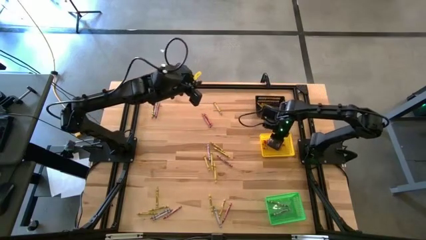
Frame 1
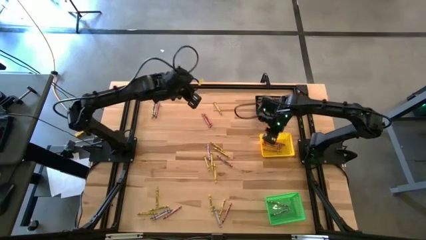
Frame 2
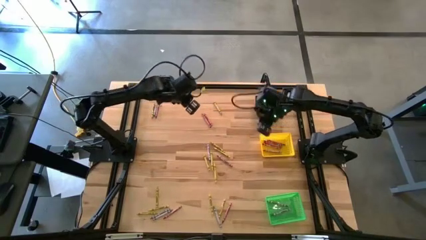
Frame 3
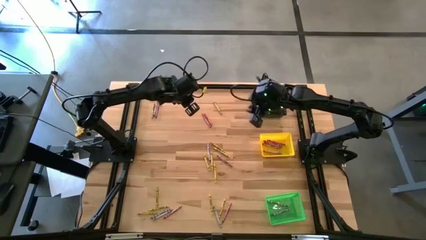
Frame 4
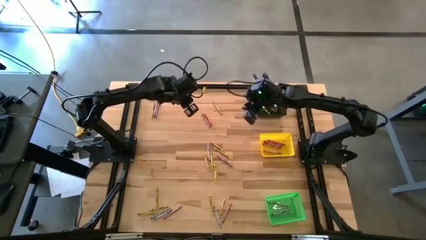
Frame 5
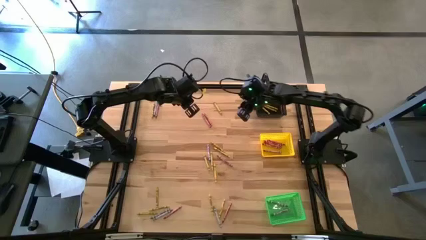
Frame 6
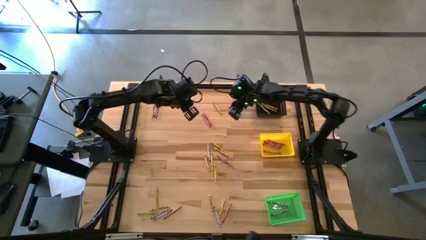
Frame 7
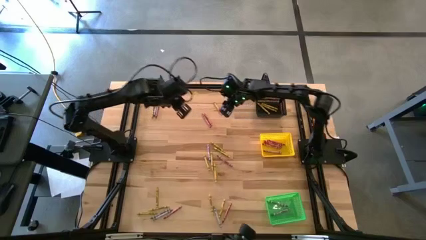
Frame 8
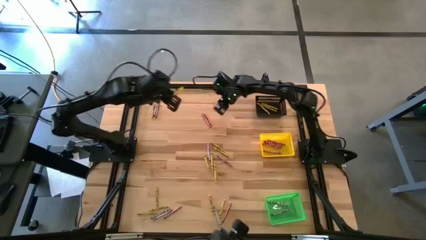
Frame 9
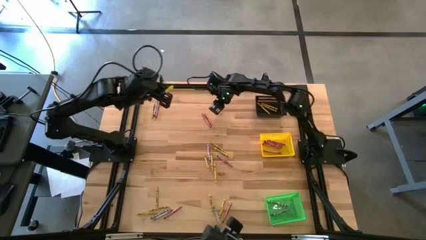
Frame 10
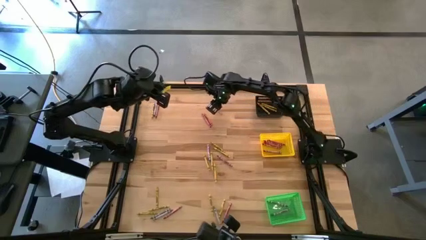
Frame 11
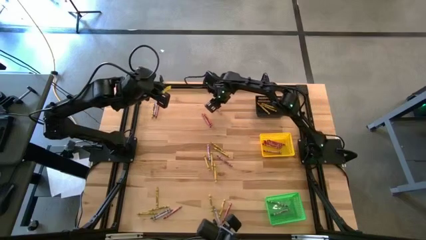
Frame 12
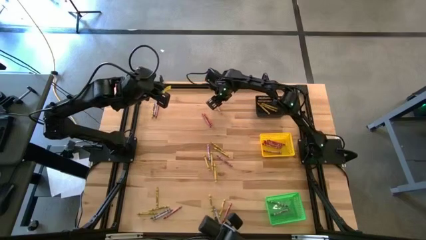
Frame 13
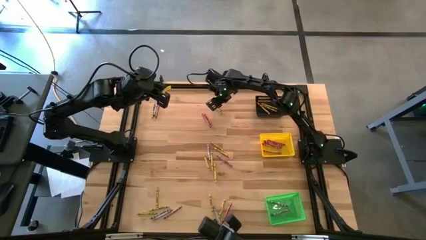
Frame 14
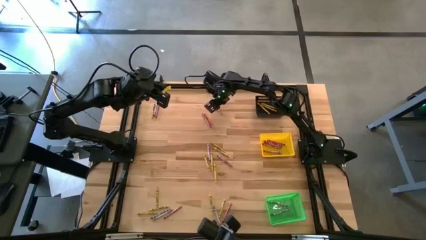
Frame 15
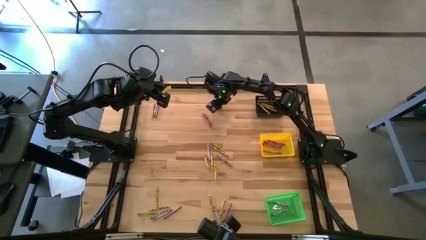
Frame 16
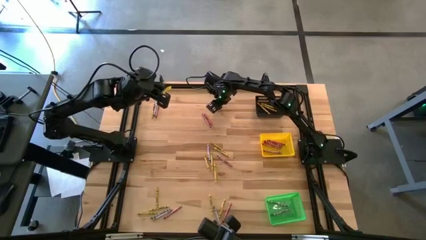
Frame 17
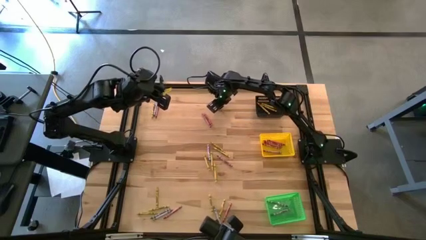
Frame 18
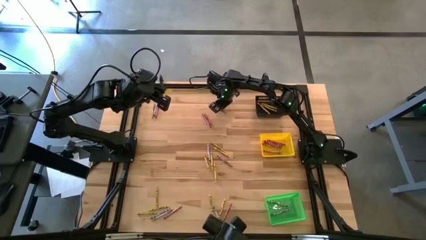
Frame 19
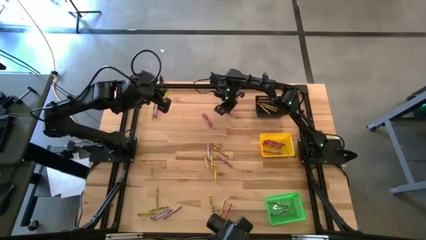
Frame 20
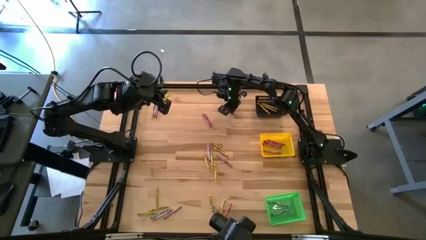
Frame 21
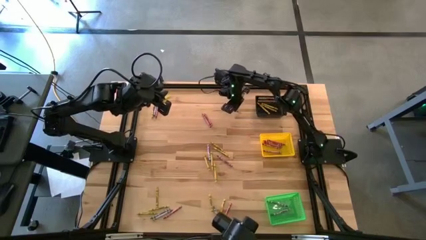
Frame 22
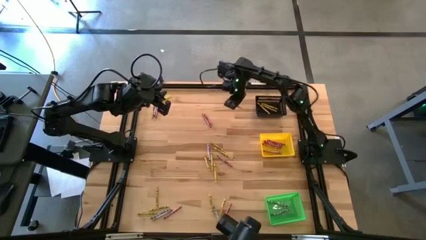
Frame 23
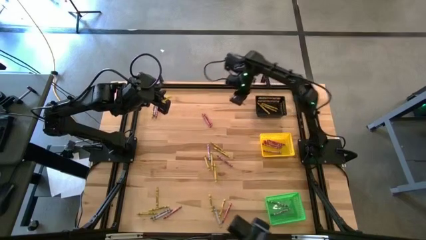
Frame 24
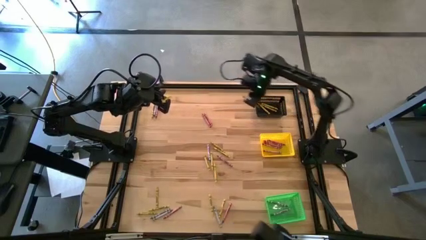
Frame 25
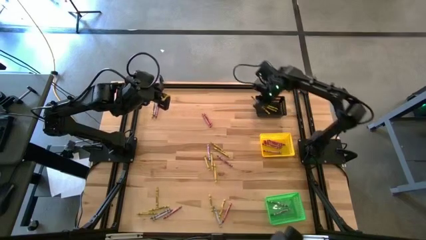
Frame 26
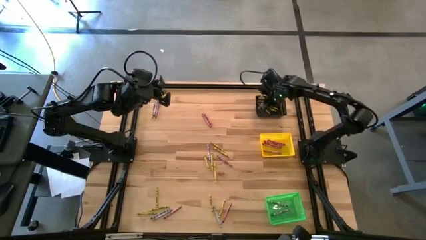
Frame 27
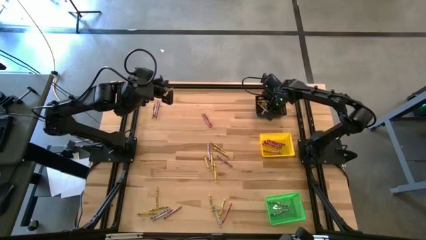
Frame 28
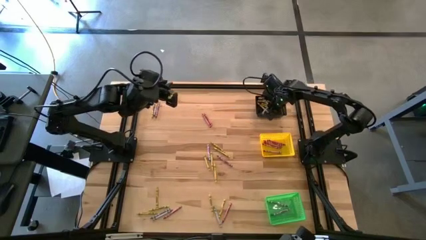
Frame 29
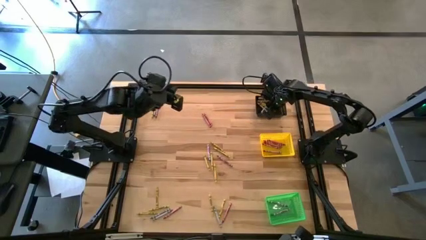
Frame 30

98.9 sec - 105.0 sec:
Task: Sort crayons
Put the yellow crayon into the black bin

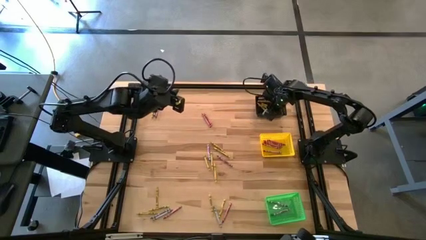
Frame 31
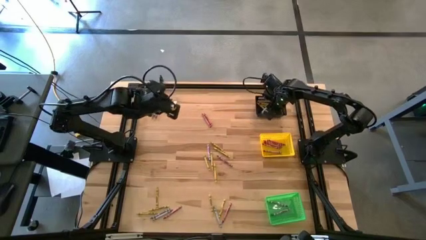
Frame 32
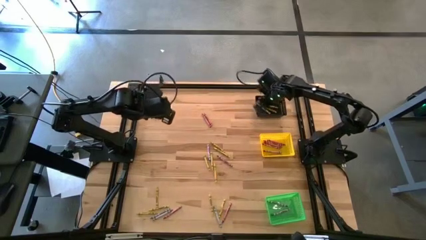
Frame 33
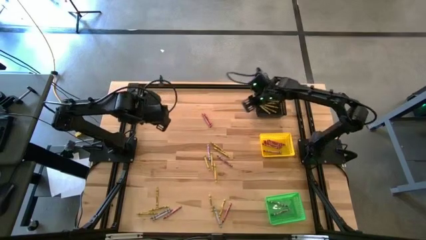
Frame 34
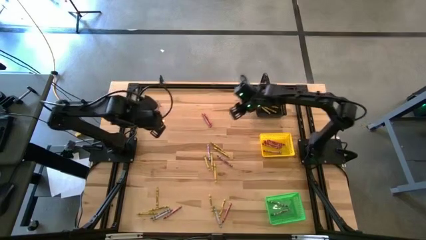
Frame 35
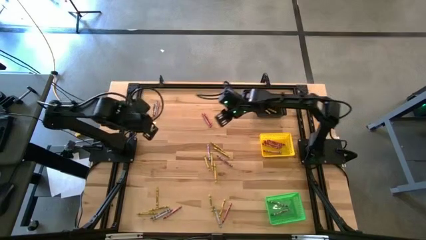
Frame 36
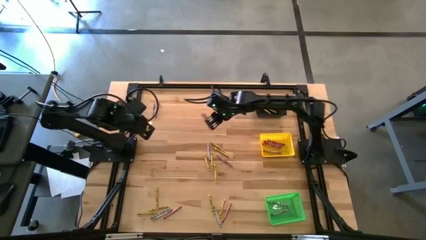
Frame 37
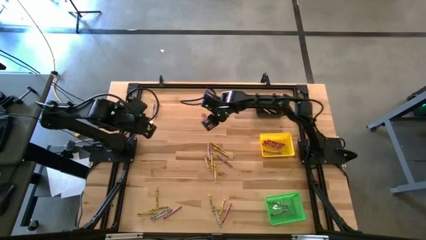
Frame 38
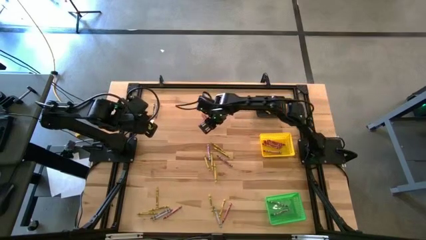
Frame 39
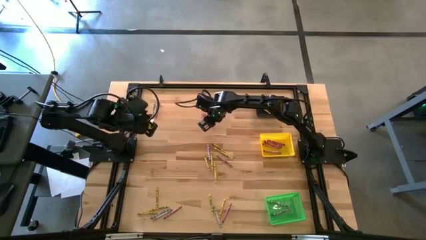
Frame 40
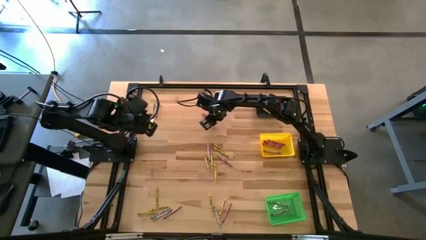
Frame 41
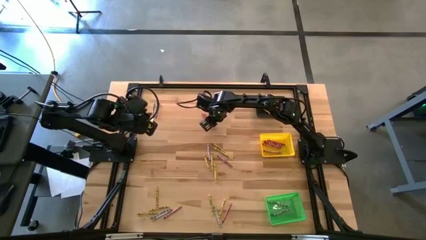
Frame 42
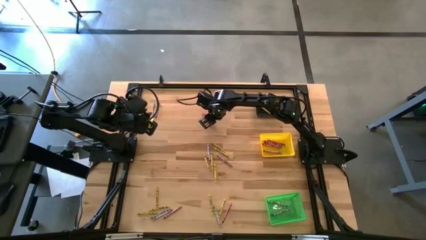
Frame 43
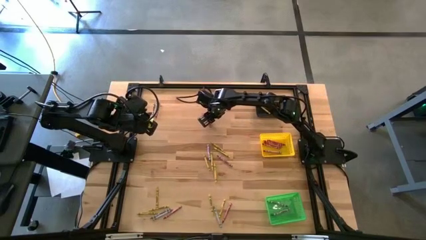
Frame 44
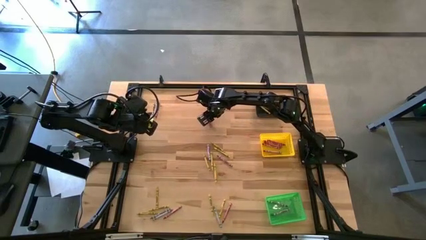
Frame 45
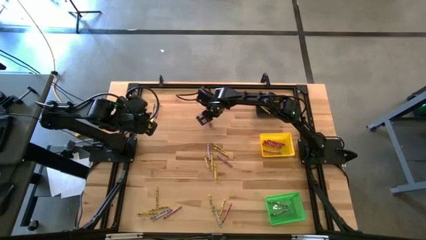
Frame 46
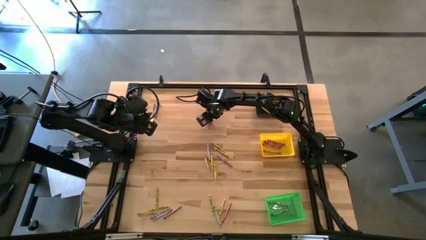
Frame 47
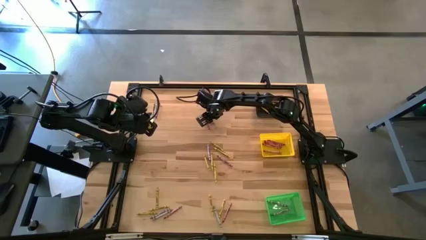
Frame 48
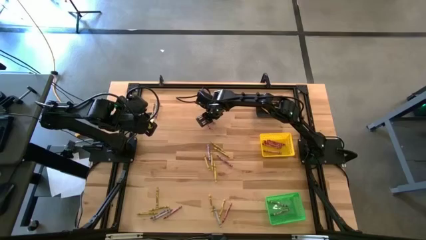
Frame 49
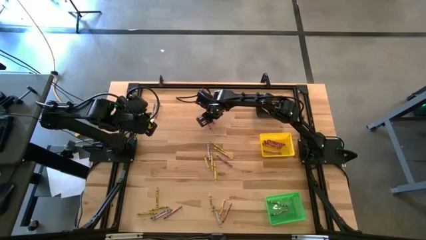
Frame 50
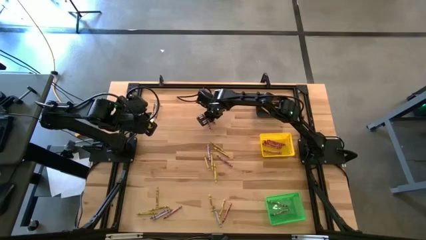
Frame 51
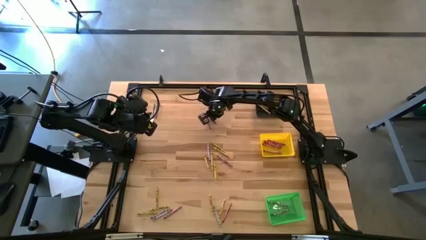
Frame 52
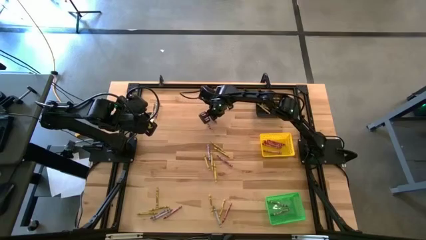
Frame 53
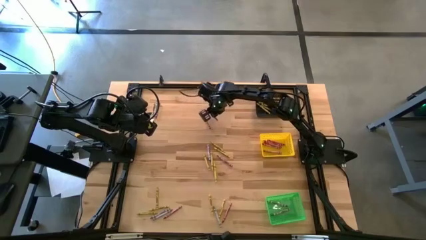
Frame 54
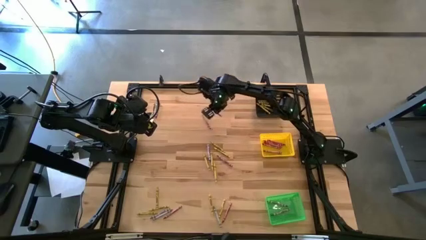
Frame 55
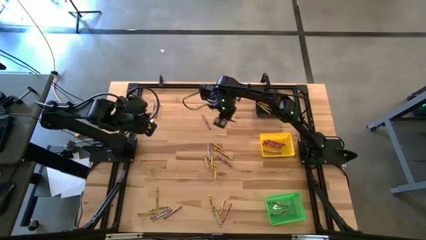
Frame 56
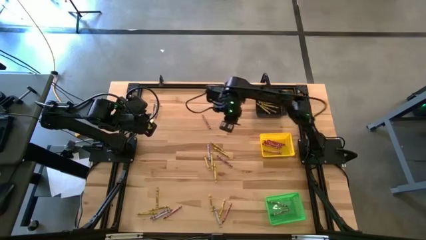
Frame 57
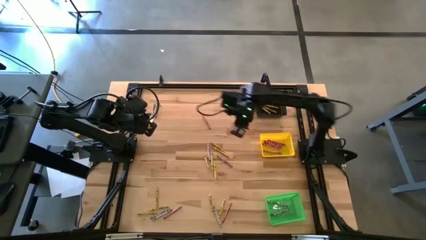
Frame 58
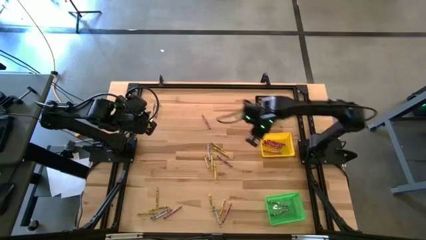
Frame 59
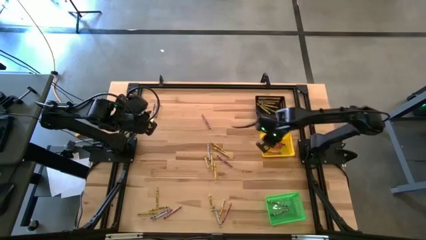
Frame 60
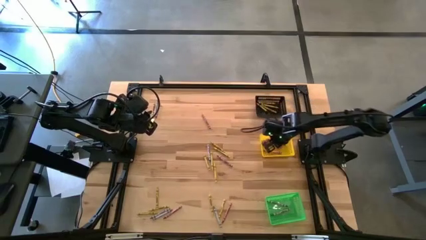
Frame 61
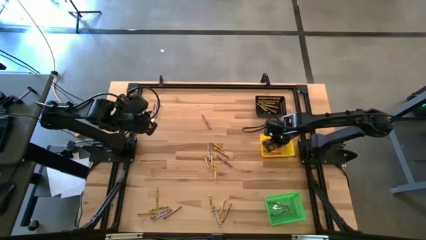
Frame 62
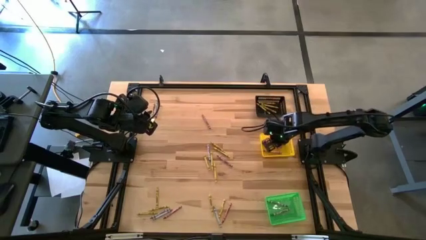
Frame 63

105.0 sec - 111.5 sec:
Put the red crayon into the yellow bin

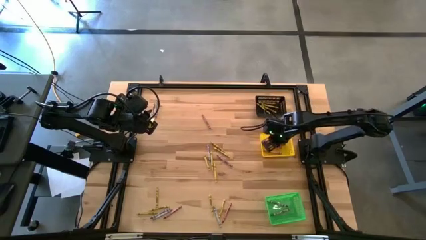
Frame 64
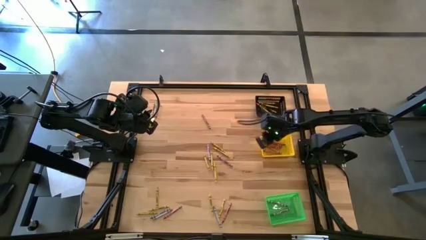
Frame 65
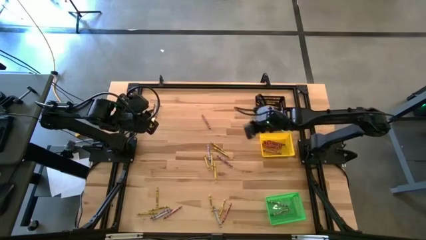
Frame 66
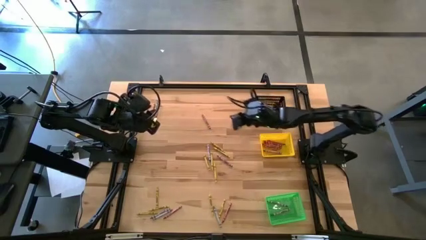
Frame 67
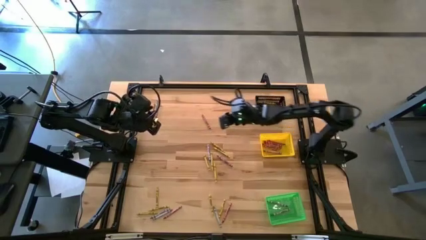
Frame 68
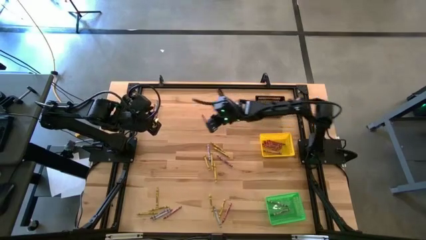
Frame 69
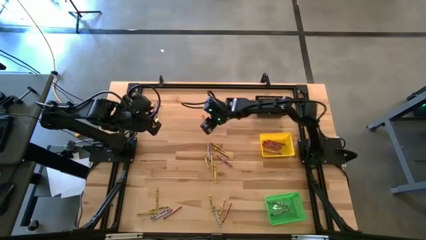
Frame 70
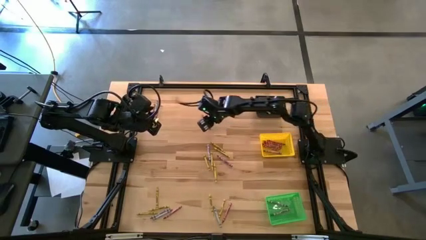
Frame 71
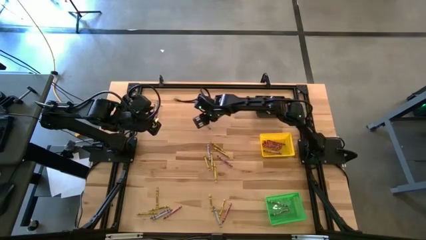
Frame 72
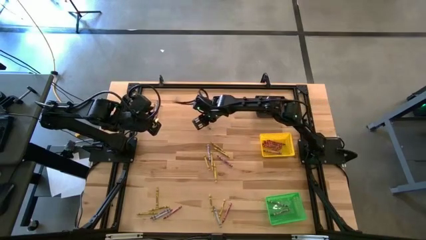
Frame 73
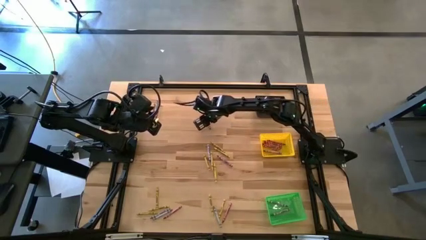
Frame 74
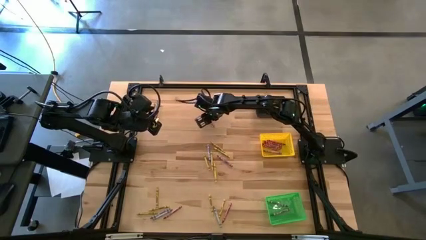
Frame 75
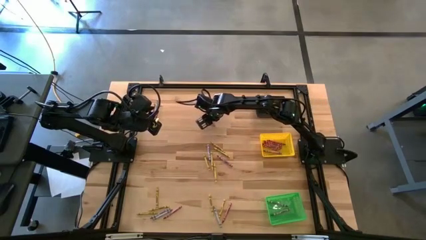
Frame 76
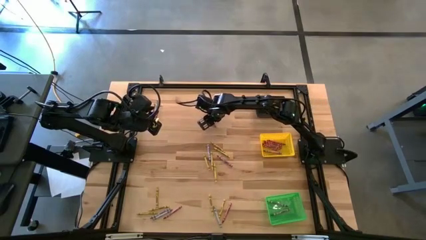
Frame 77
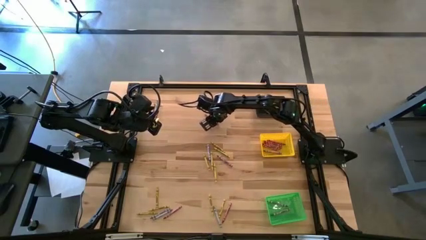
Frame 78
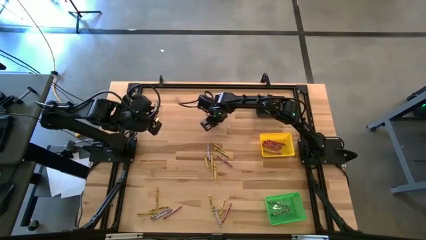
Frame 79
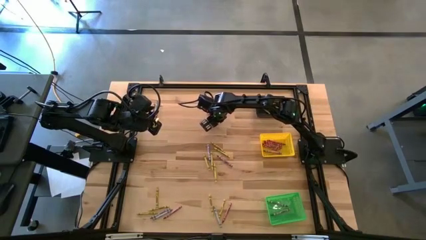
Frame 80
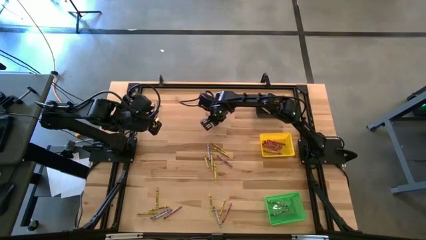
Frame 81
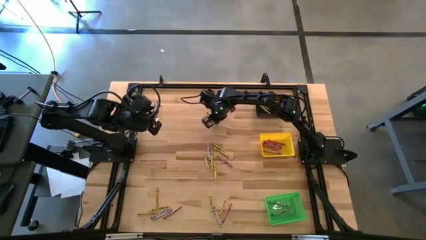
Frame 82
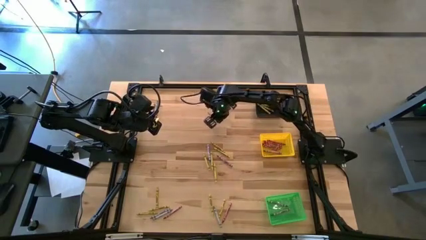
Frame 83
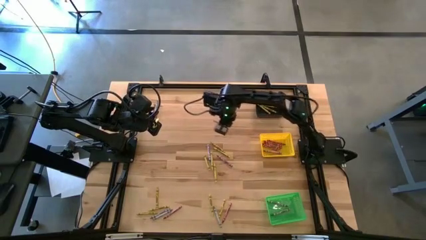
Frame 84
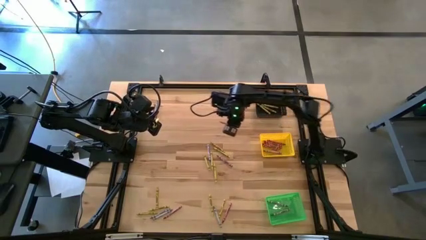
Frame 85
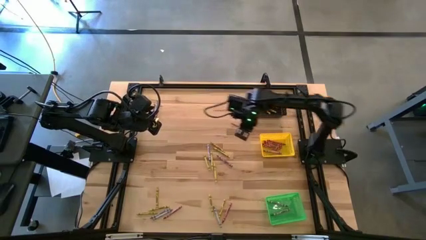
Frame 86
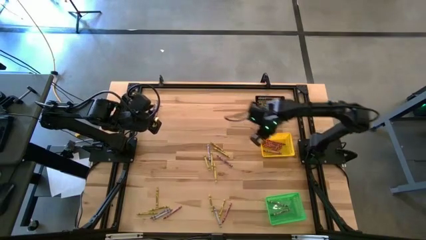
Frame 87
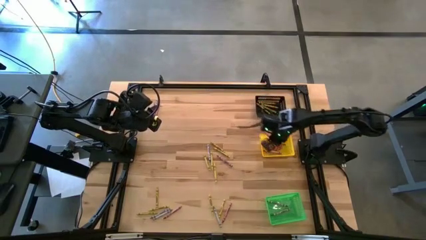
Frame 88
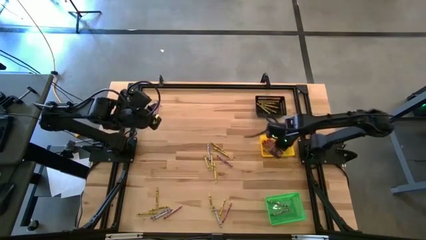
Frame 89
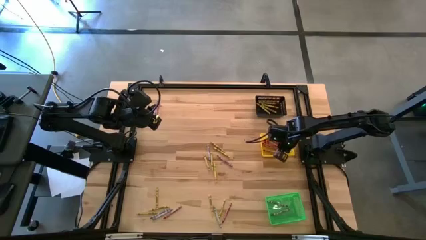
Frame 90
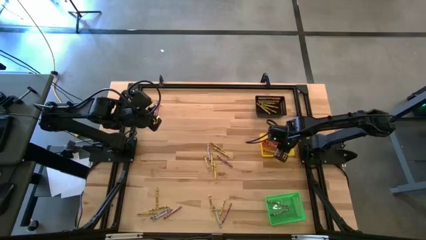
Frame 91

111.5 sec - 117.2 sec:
Put the red crayon into the yellow bin
